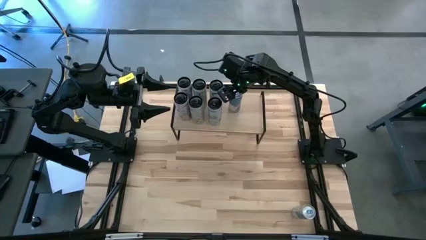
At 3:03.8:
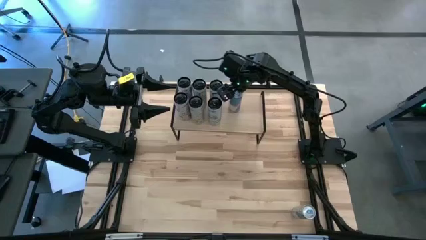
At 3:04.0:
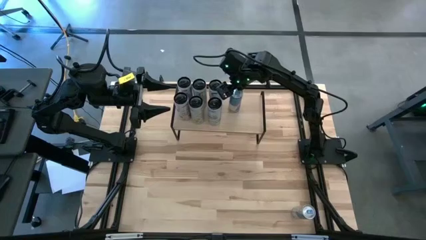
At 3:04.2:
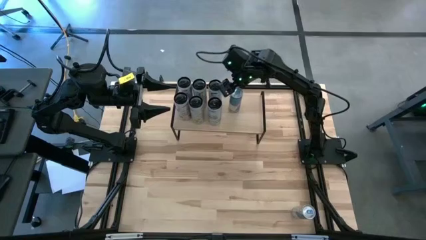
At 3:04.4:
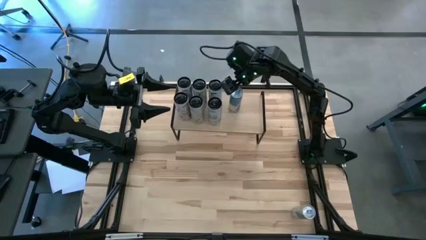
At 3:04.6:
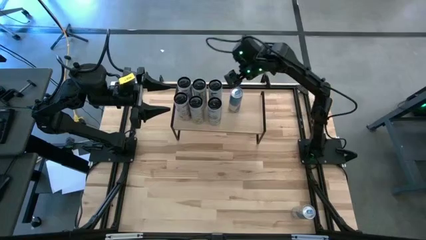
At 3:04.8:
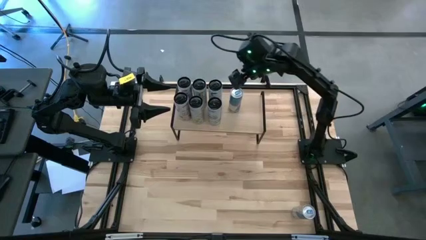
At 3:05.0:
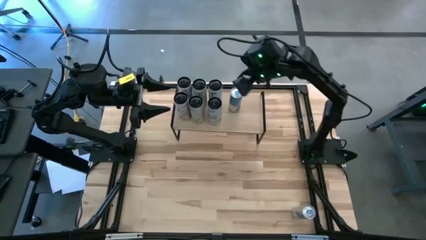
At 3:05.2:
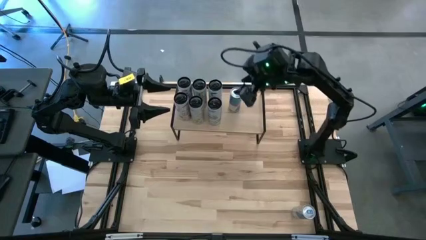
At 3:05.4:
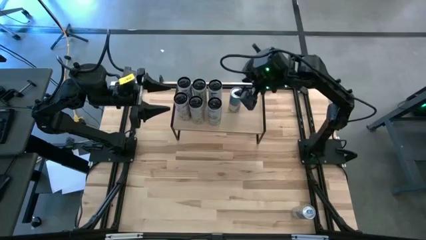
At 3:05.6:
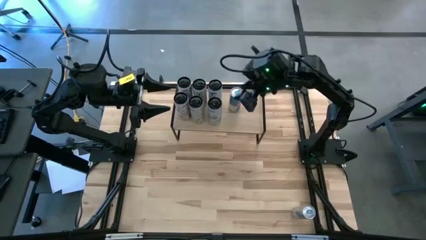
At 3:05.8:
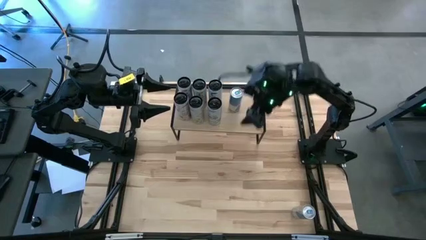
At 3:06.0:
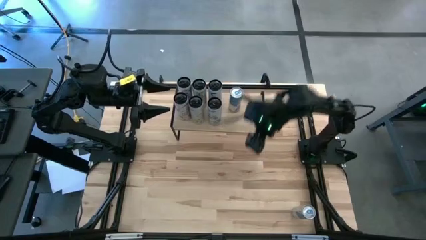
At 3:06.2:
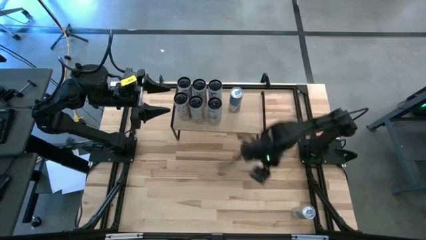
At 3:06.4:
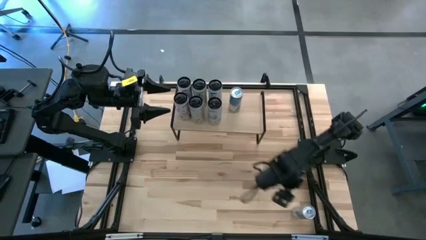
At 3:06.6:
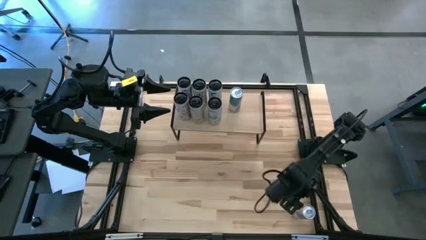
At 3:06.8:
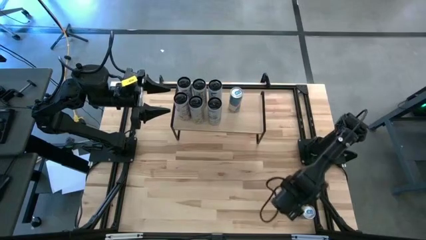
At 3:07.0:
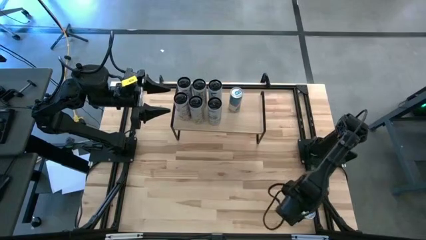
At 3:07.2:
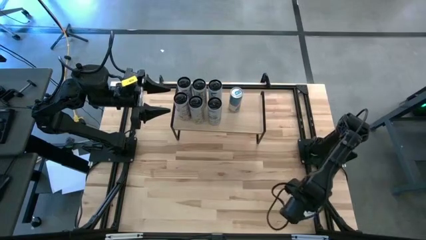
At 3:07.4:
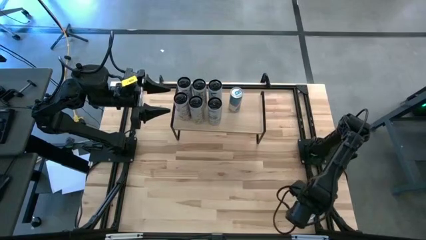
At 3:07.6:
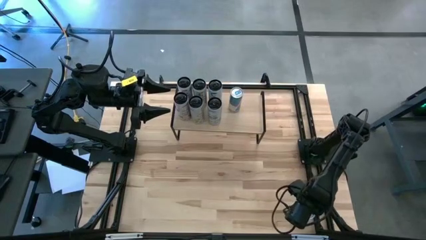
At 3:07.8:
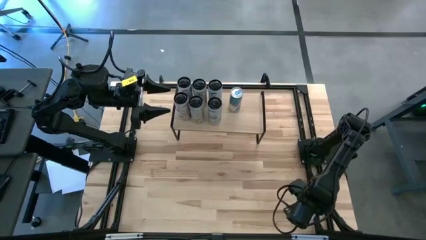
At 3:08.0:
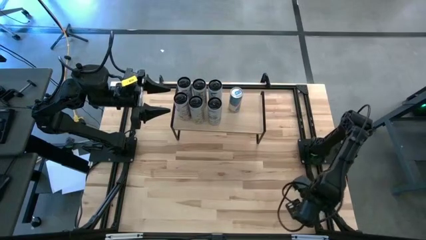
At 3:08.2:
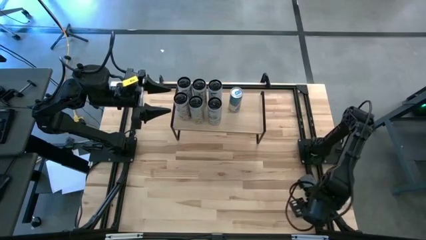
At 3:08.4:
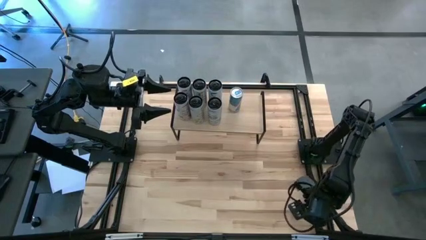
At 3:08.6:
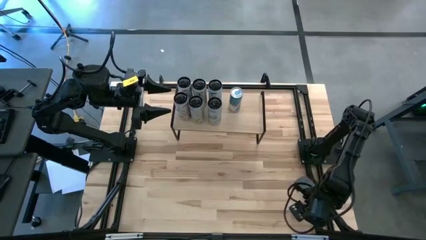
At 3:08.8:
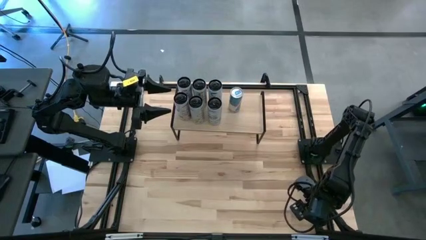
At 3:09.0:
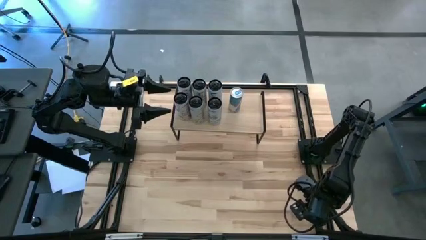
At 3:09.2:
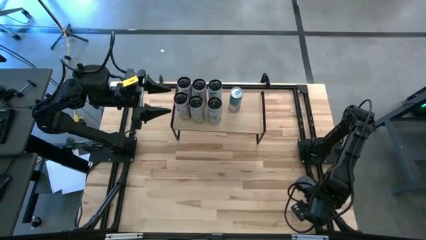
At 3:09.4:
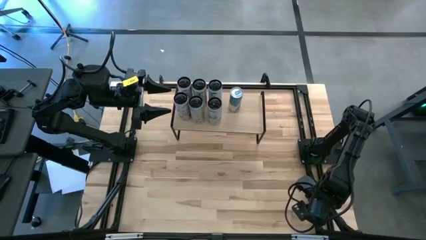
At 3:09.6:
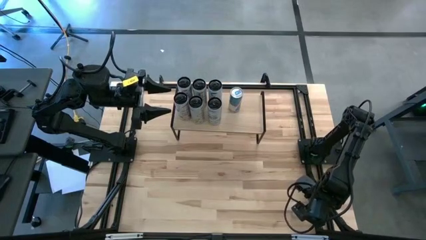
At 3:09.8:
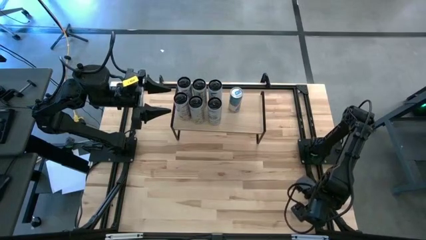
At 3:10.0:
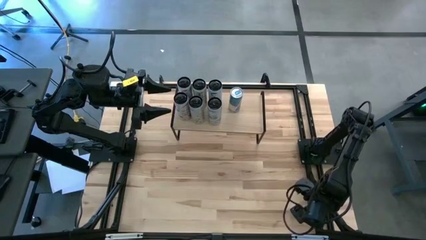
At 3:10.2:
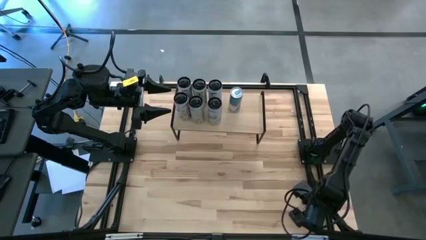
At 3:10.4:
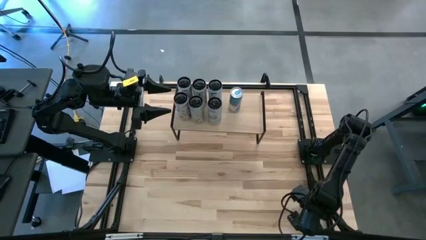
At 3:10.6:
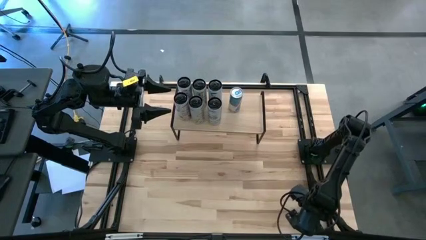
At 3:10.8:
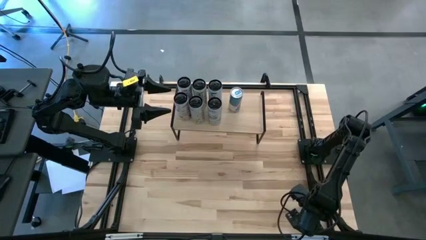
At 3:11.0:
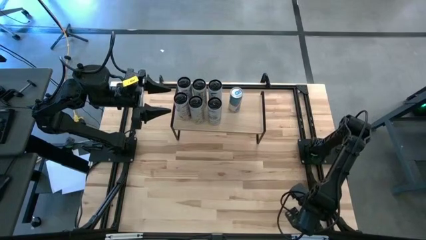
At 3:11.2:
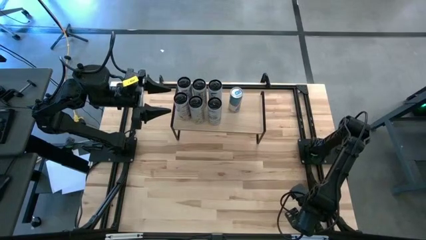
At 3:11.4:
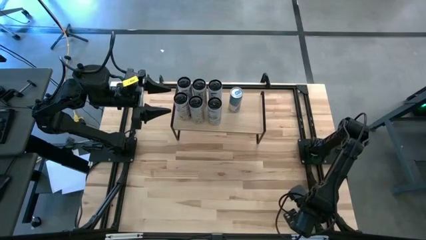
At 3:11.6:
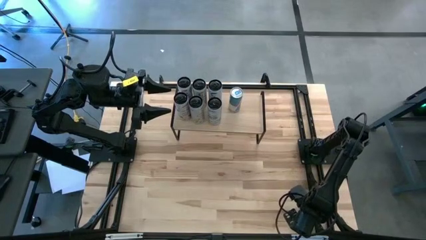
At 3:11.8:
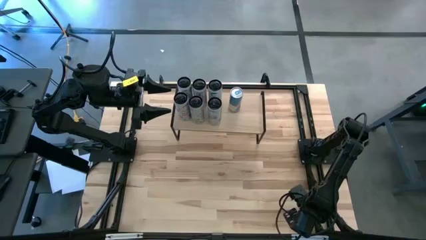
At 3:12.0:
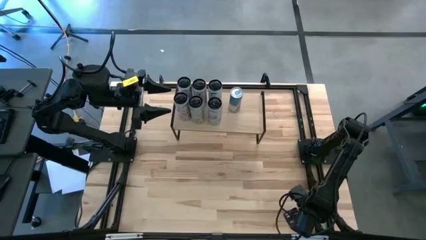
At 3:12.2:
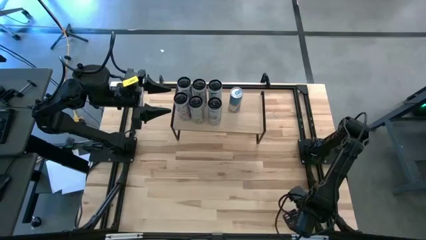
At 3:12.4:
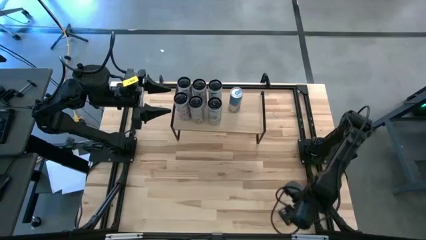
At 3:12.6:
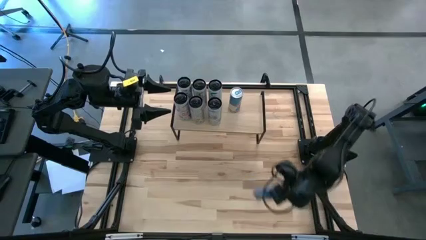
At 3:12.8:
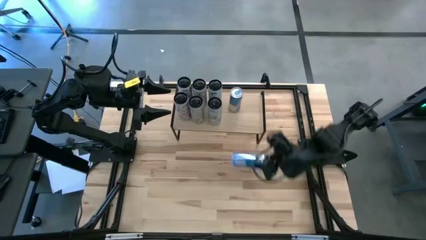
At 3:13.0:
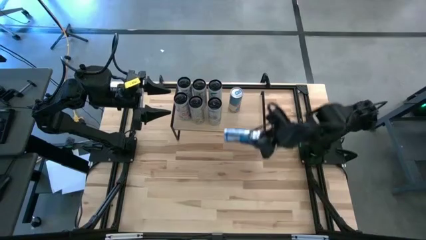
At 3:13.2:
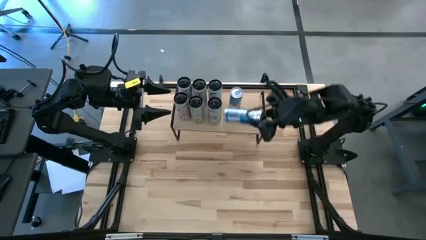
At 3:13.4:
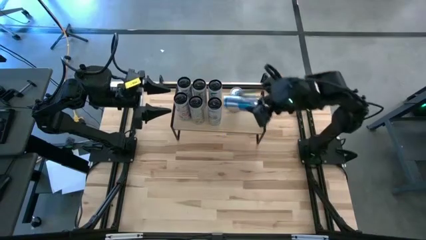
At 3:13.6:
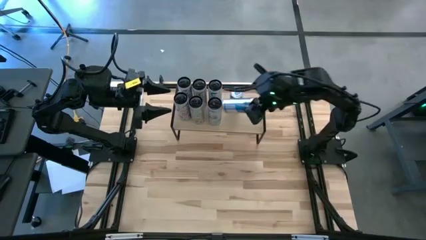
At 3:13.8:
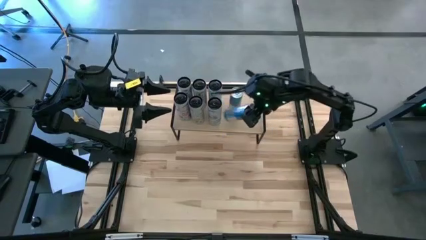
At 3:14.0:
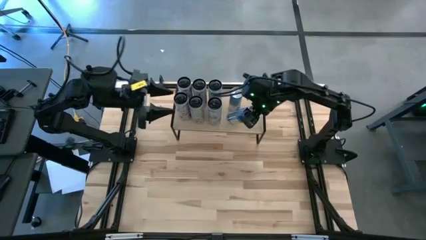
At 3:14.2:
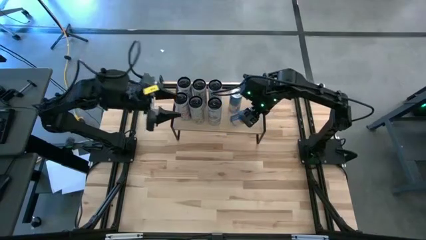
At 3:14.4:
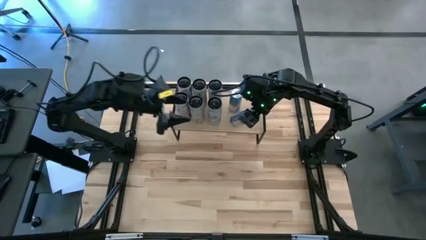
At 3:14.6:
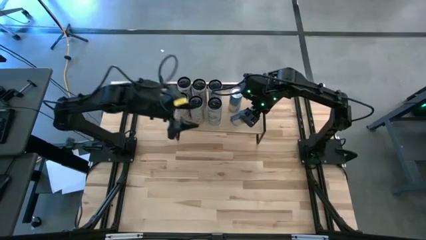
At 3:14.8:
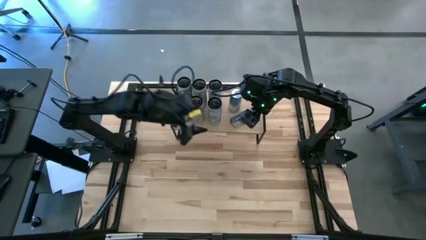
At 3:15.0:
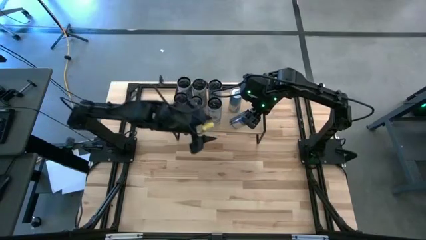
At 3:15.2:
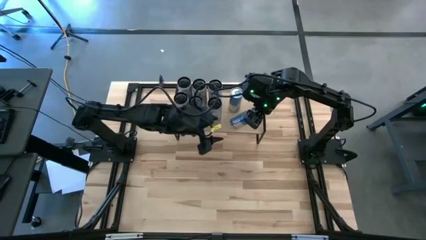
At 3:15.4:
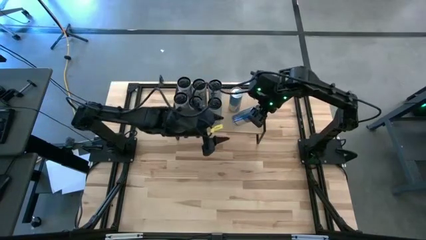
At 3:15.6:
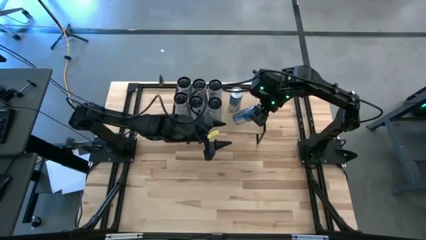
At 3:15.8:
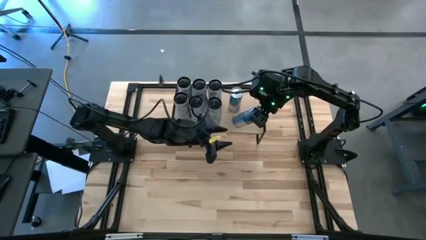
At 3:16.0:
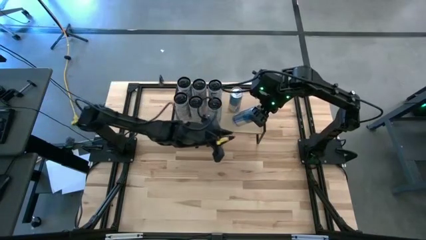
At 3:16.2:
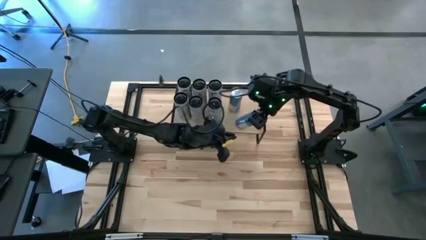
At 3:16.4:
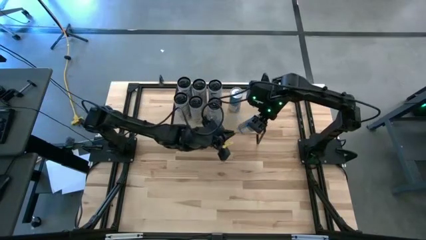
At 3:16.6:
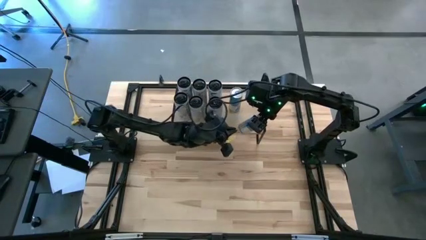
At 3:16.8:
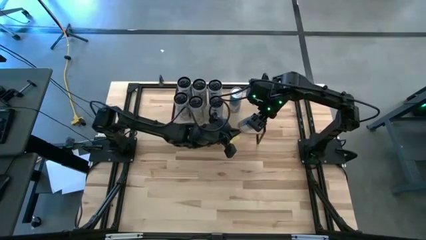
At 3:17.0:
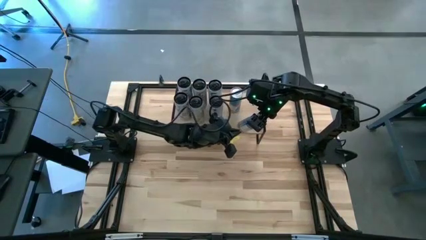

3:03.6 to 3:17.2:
Task: Place canned beverage on shelf
Put the blue soda can on the shelf aligned with the other blue soda can
